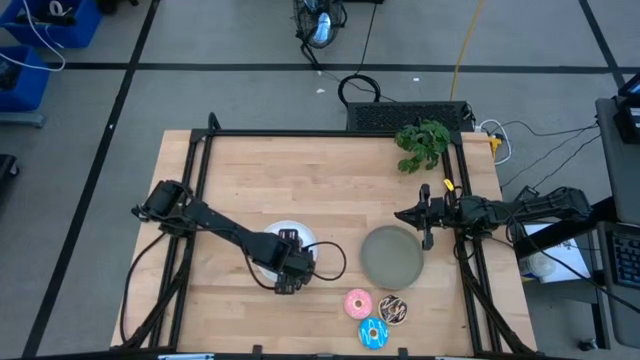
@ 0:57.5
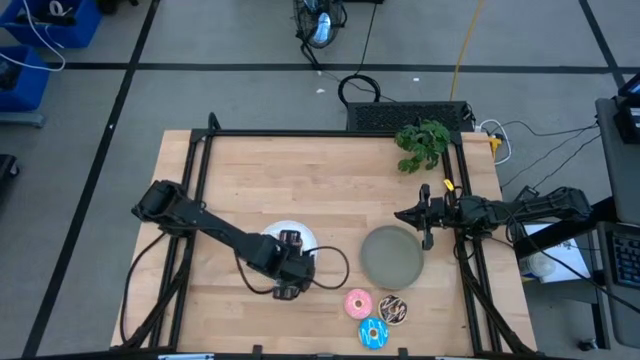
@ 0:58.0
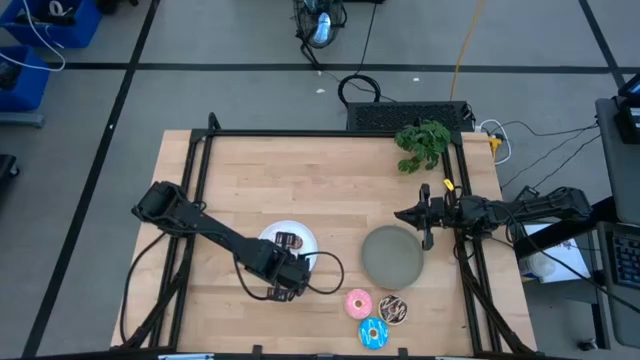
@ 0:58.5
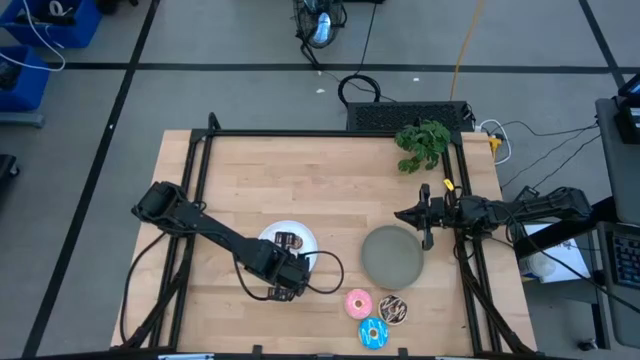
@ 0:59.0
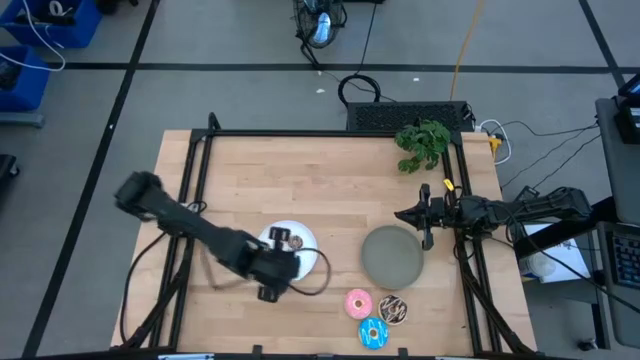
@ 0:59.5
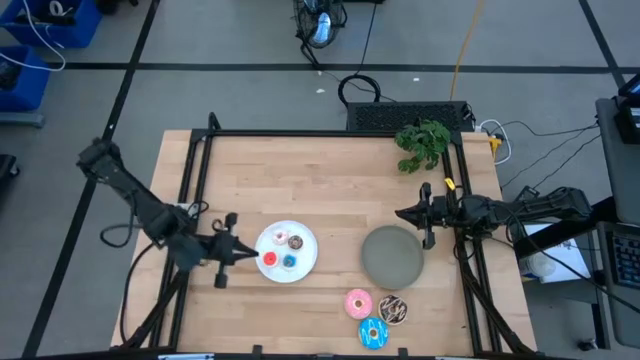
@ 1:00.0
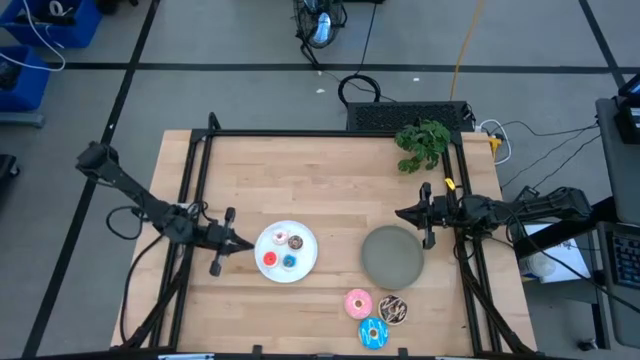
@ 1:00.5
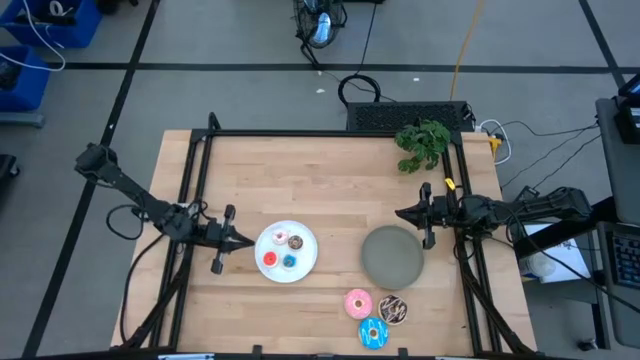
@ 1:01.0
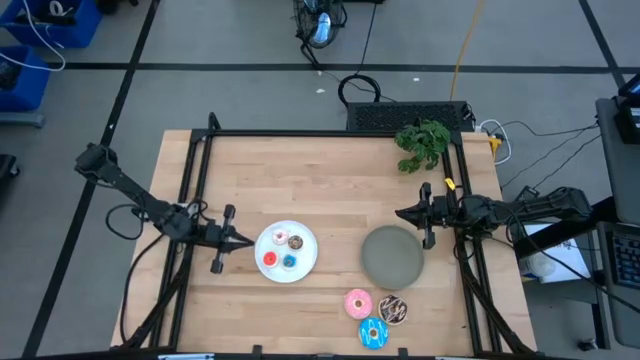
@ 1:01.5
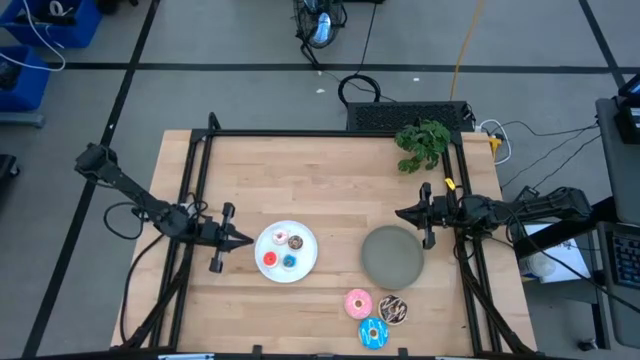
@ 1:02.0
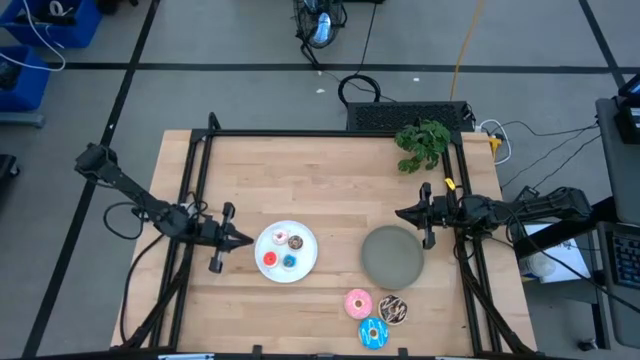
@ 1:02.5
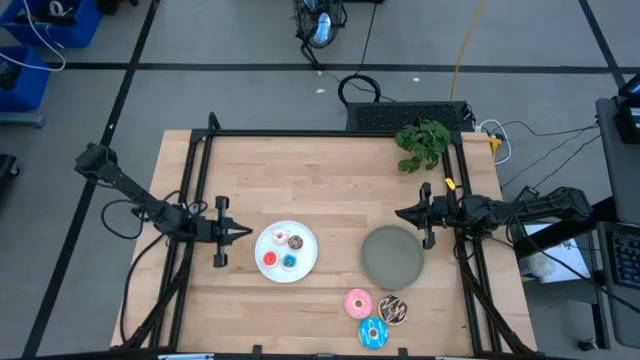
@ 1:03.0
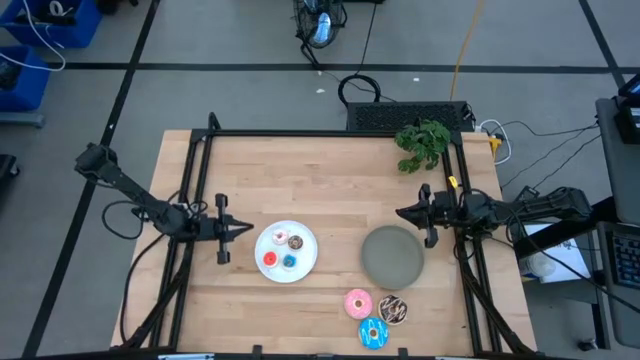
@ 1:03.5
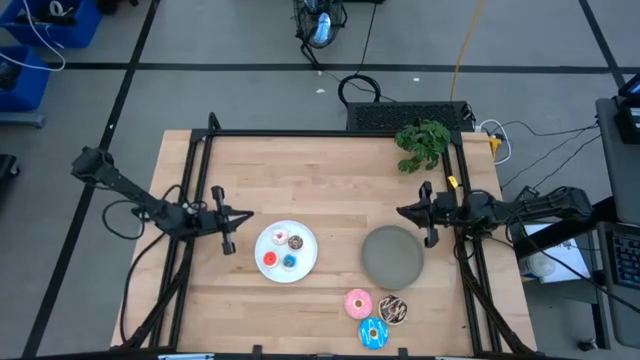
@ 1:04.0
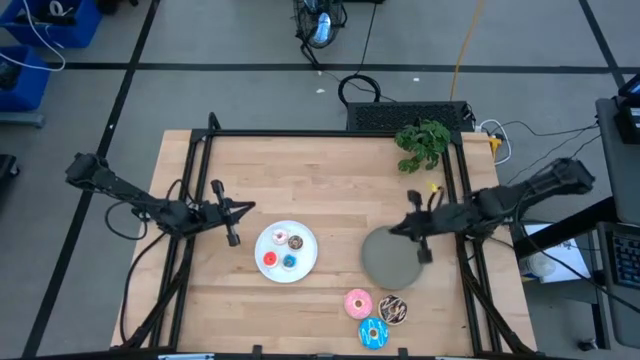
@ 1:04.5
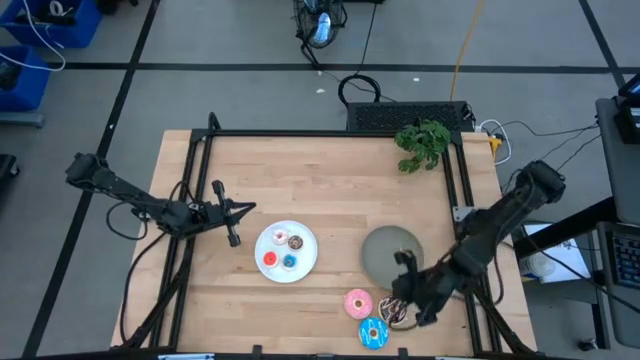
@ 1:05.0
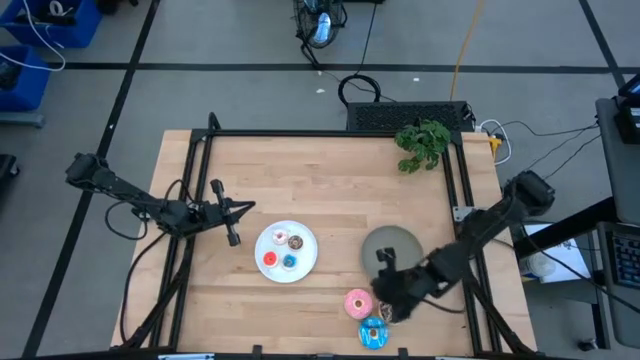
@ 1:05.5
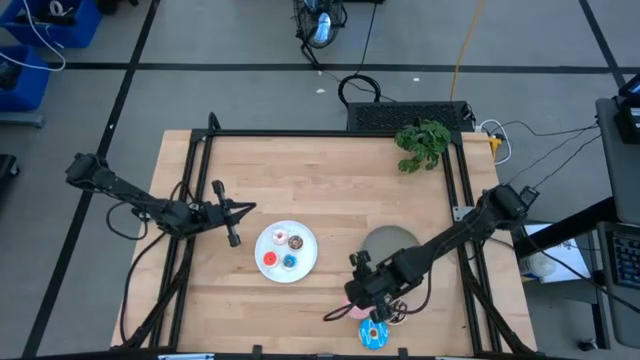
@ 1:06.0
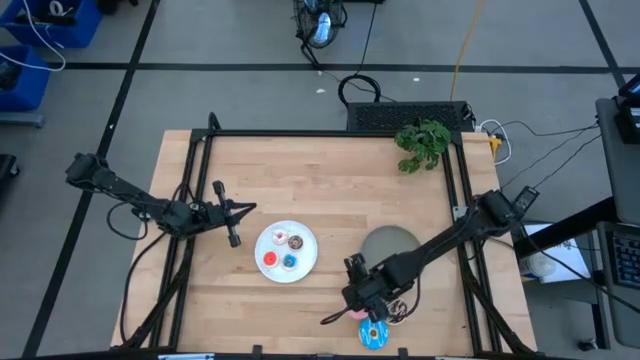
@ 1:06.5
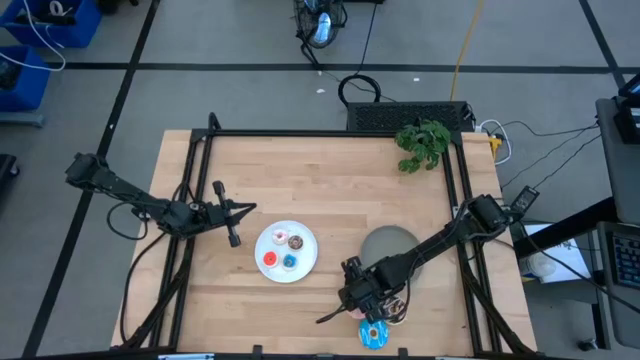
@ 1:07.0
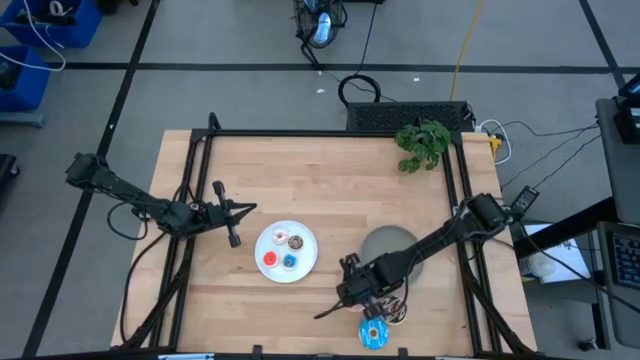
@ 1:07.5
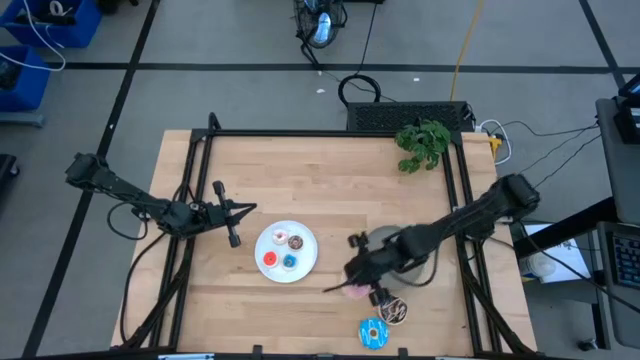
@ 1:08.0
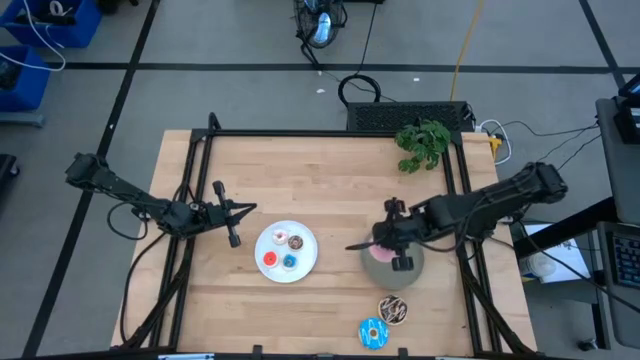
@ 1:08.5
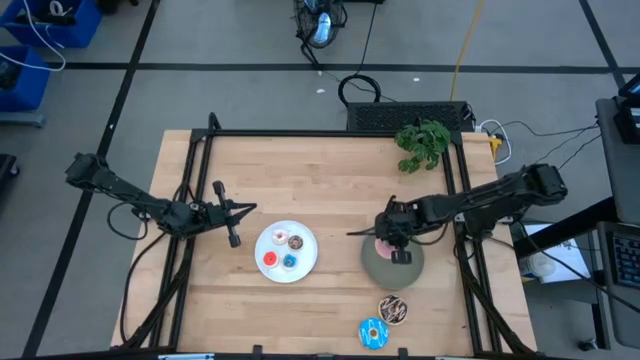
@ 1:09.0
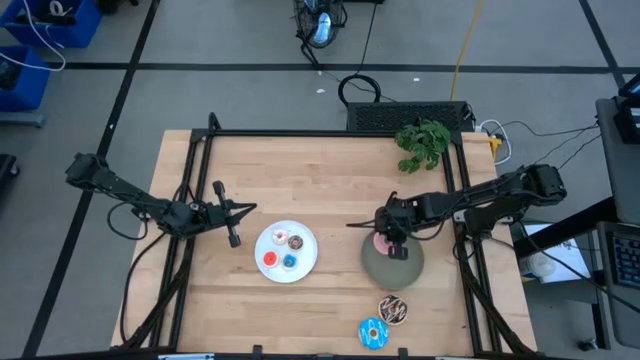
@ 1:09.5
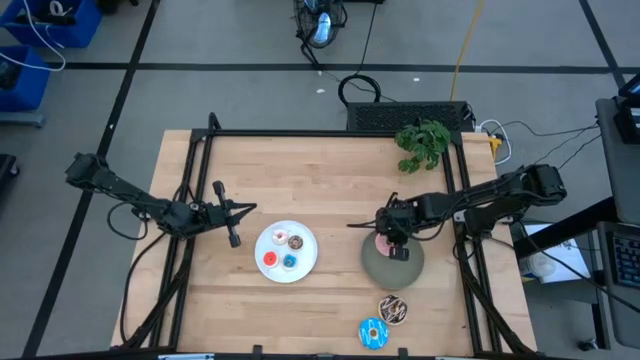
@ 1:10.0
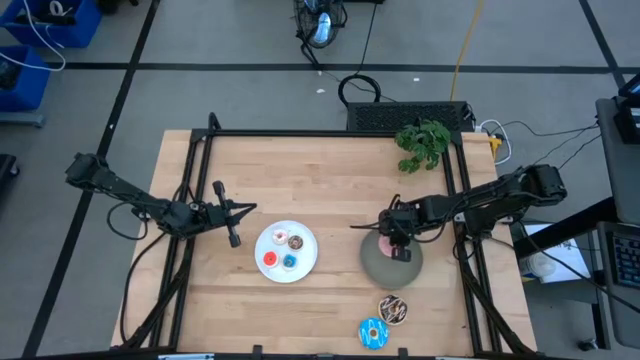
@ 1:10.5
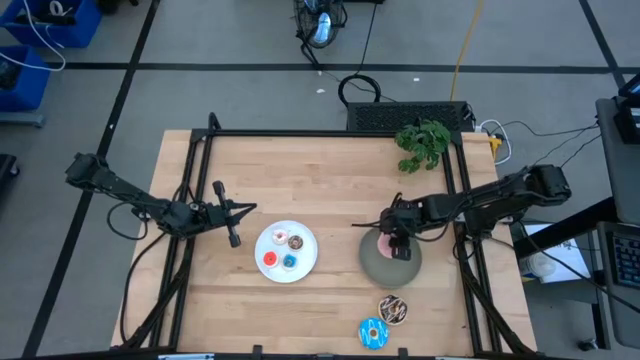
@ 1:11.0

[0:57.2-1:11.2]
Task: Pick & Place donuts
Put the large pink donut on the gray plate

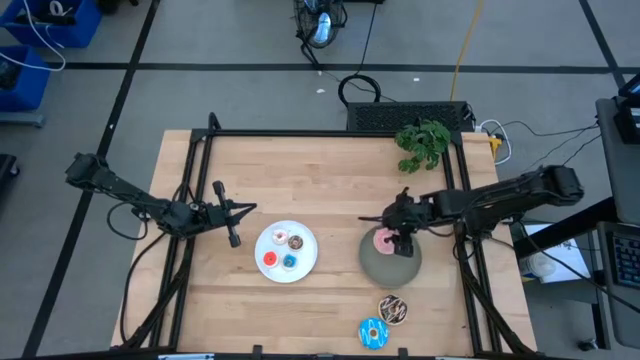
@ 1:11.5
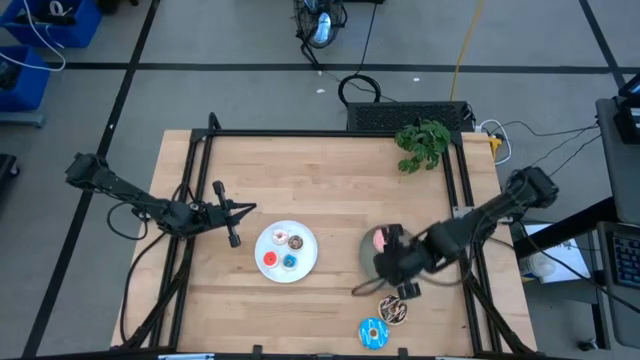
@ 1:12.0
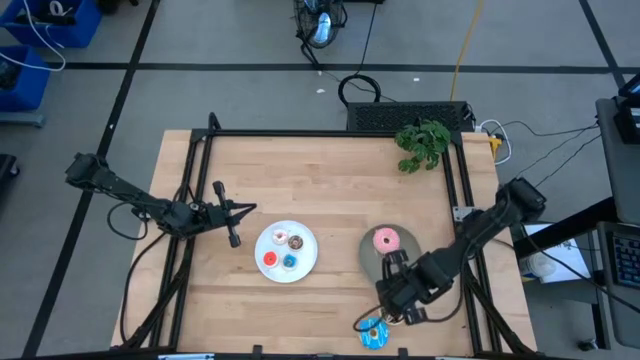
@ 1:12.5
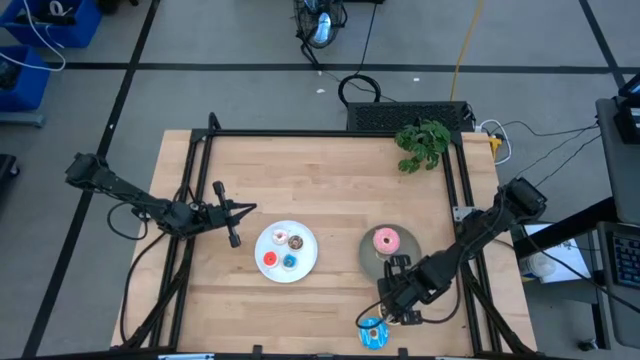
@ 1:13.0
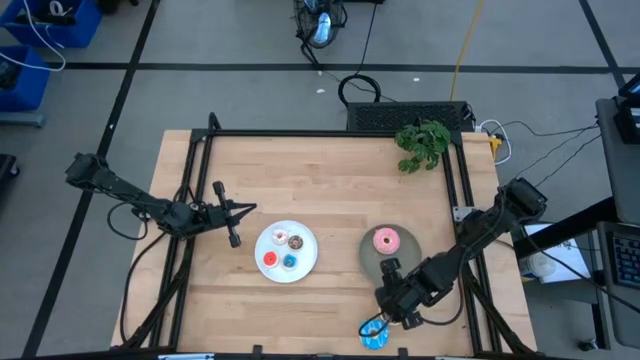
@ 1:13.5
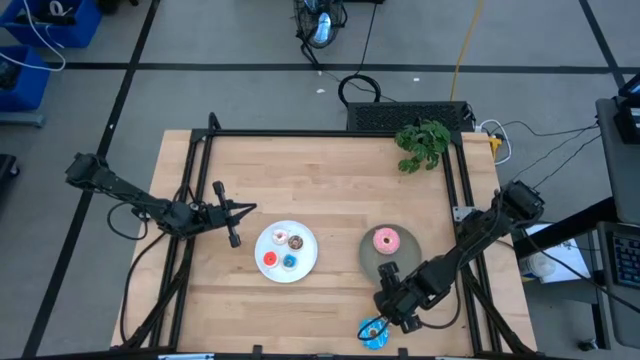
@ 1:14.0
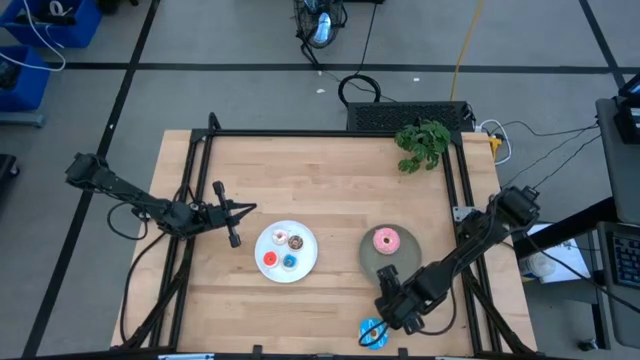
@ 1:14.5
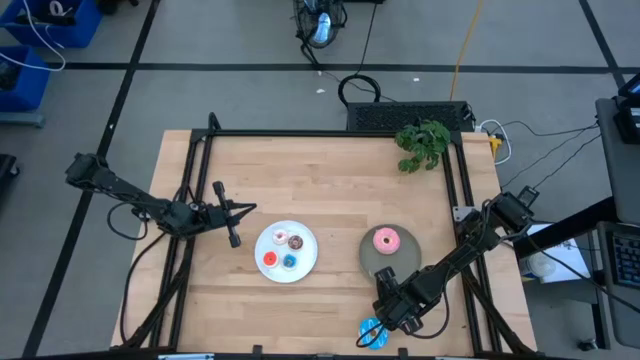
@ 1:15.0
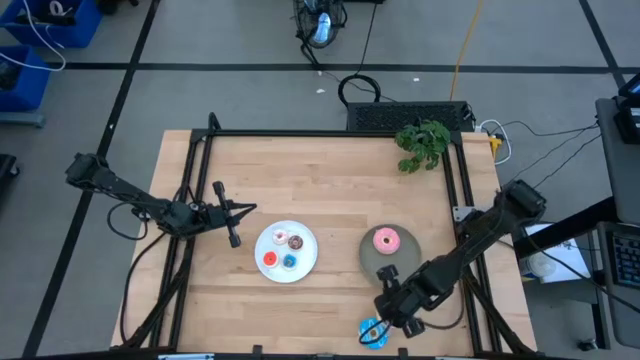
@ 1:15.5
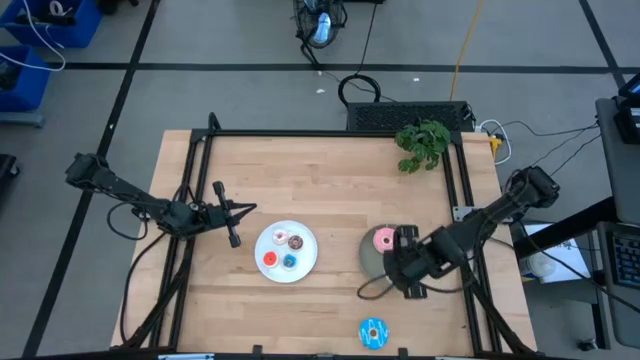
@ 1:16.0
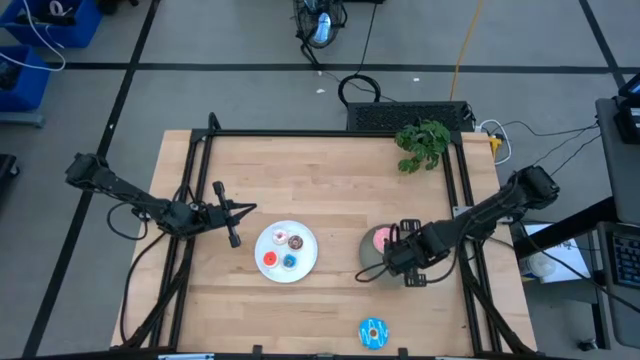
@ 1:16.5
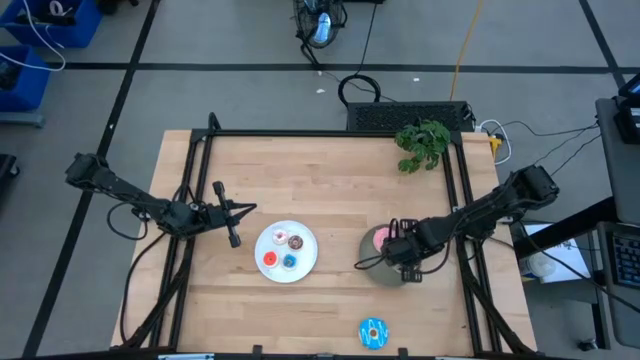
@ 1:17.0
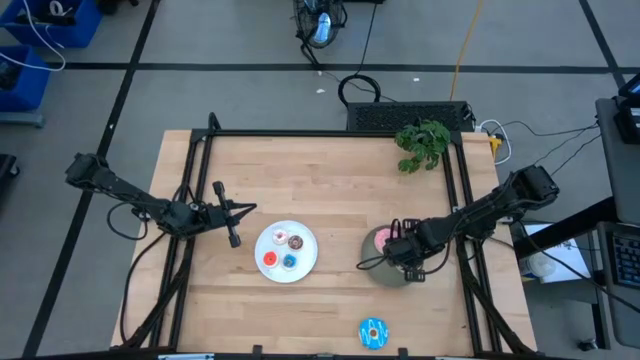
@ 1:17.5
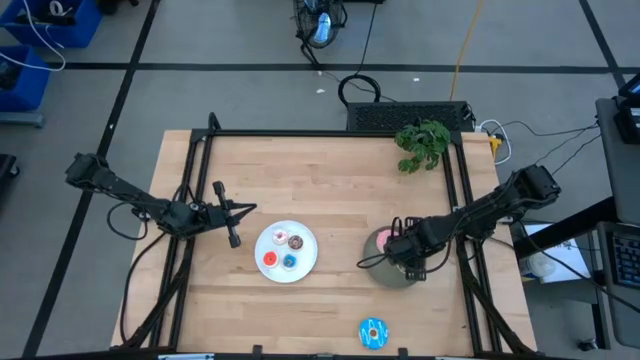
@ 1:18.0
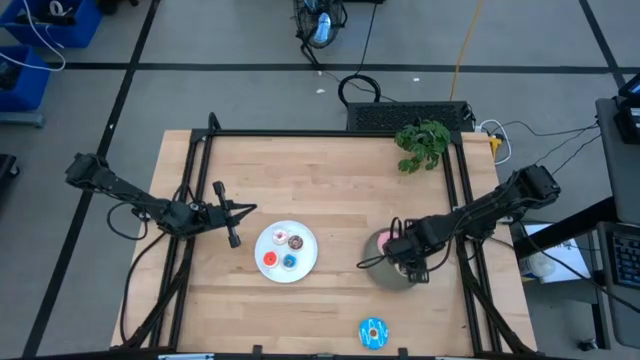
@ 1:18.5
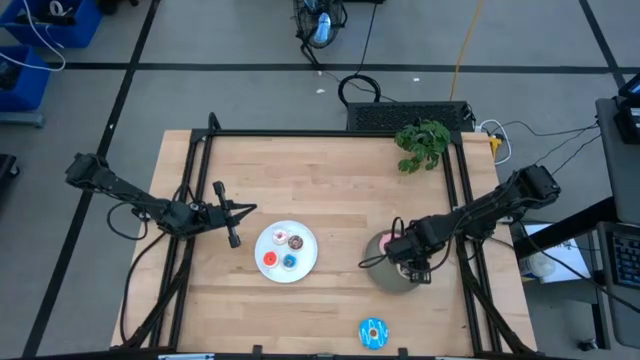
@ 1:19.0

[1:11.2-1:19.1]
Put the large black donut on the gray plate

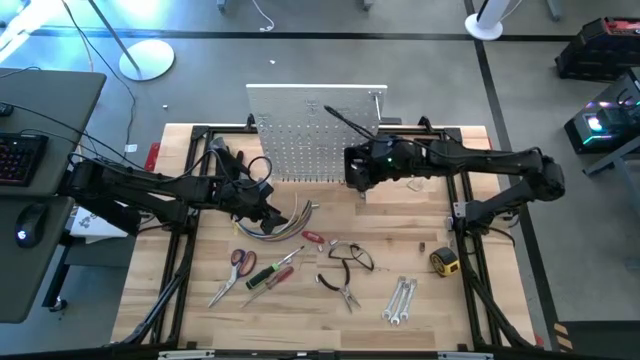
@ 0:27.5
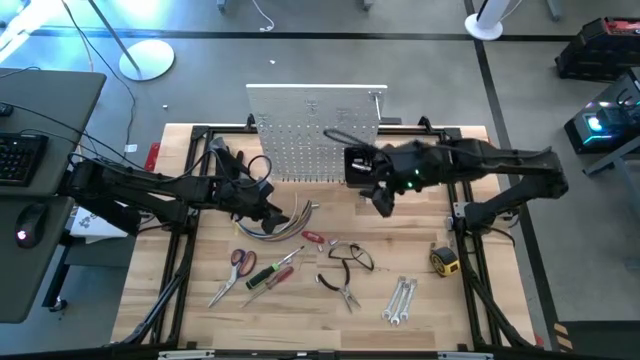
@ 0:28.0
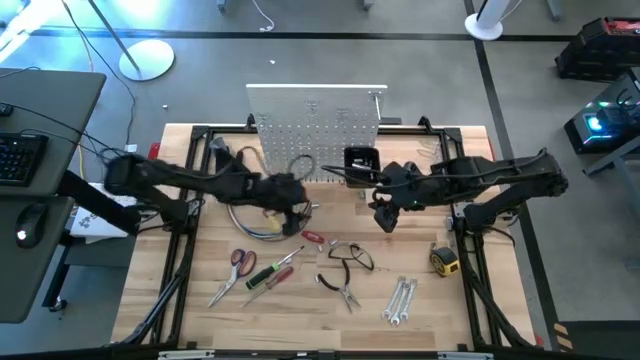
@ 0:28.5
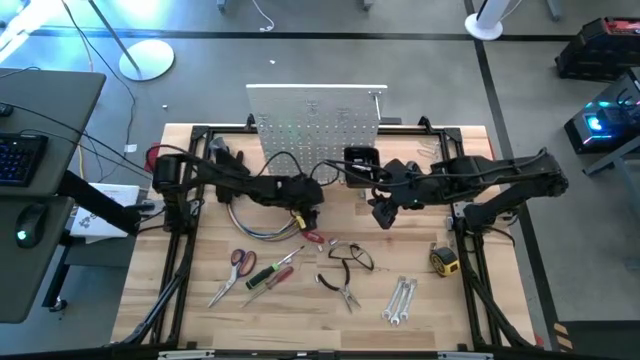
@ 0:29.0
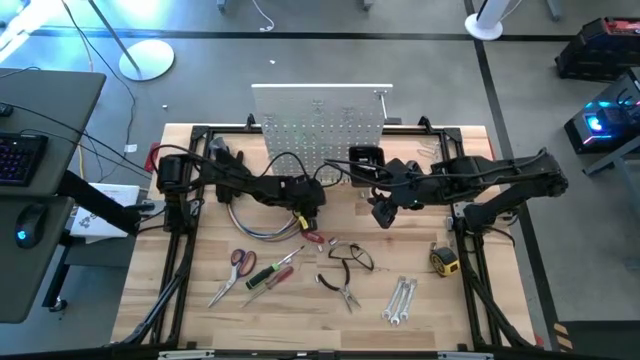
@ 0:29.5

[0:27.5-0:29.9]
Task: Hang tools onto peg board
Put the socket into the black bin on the peg board
